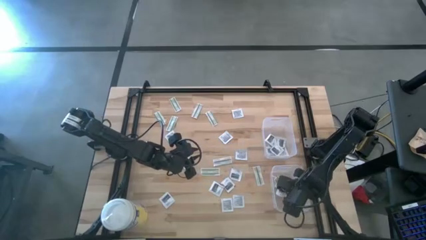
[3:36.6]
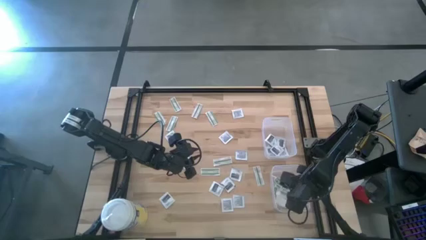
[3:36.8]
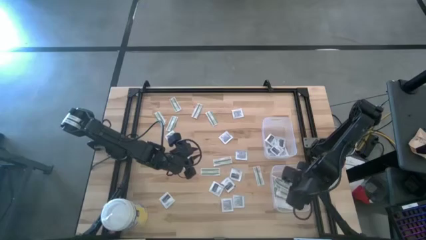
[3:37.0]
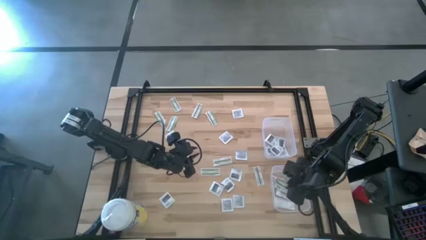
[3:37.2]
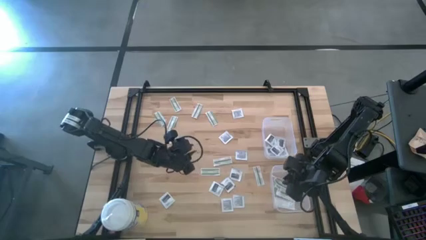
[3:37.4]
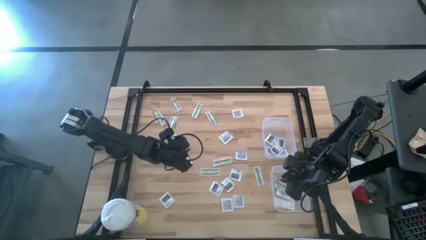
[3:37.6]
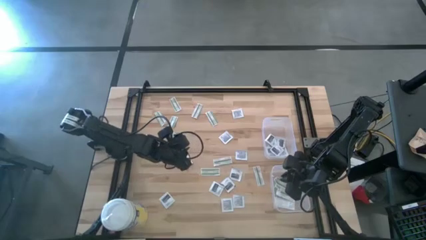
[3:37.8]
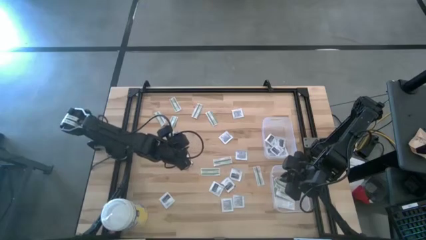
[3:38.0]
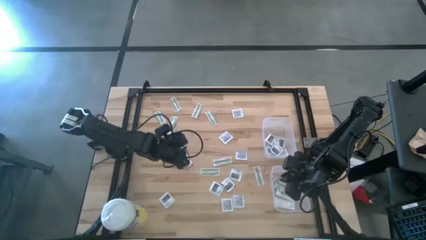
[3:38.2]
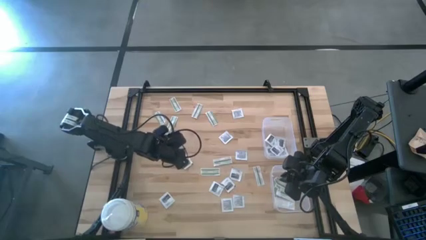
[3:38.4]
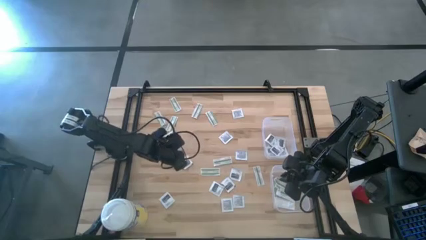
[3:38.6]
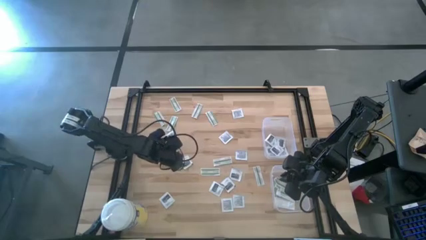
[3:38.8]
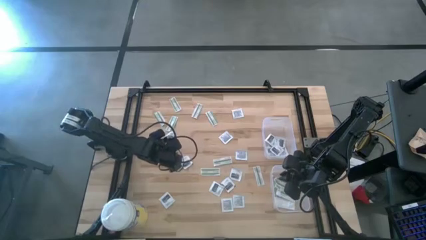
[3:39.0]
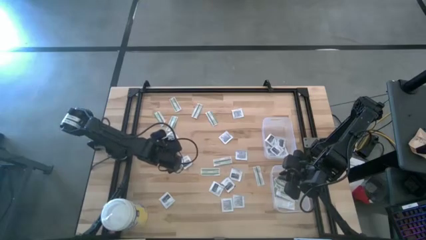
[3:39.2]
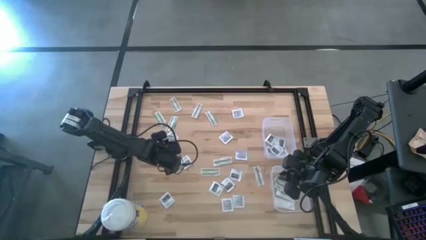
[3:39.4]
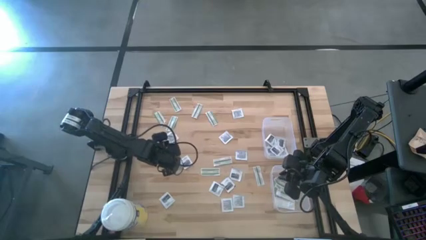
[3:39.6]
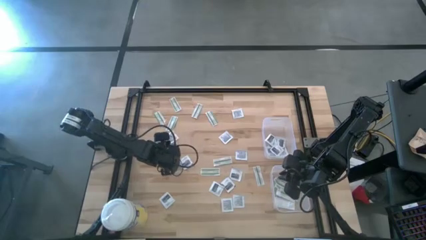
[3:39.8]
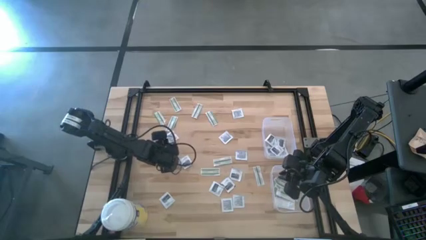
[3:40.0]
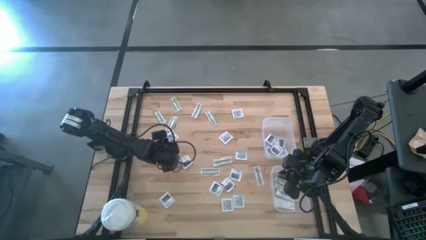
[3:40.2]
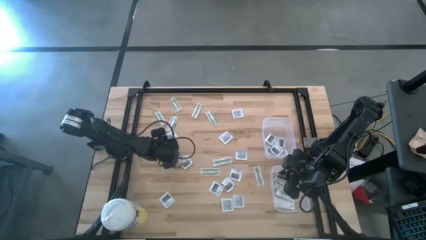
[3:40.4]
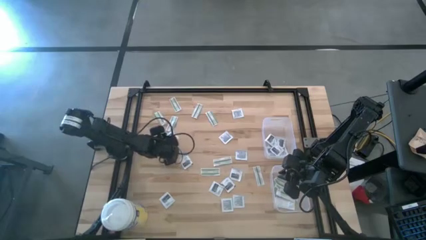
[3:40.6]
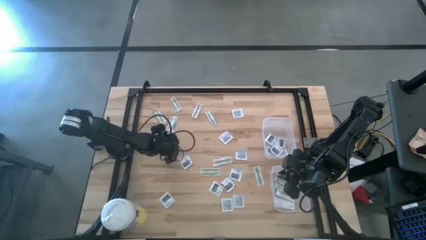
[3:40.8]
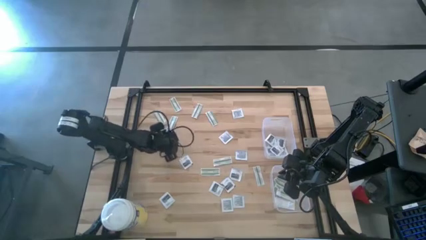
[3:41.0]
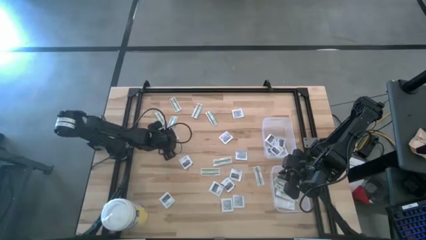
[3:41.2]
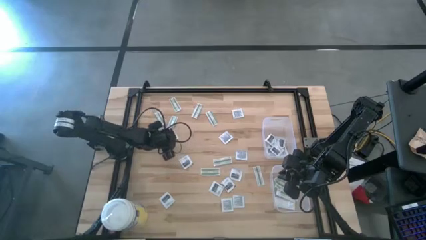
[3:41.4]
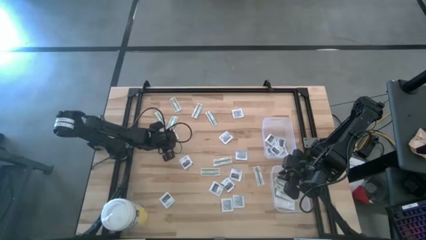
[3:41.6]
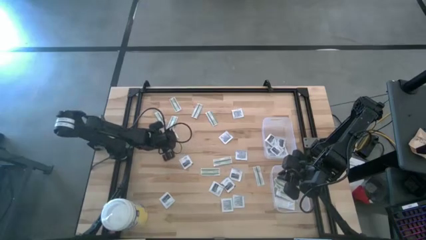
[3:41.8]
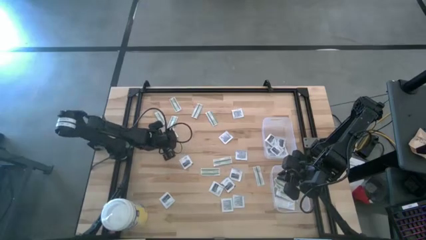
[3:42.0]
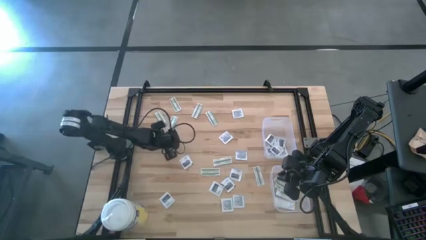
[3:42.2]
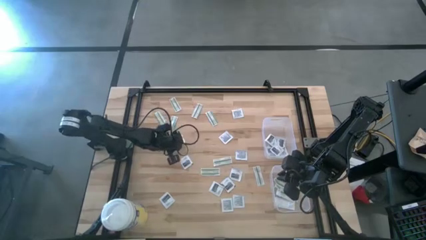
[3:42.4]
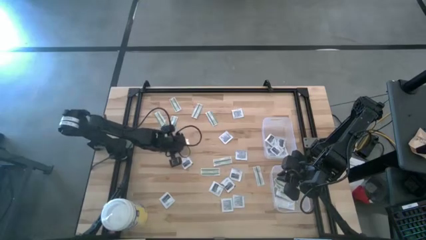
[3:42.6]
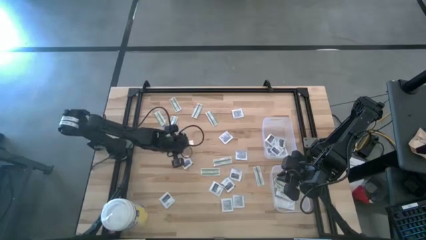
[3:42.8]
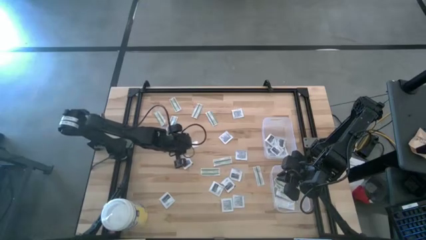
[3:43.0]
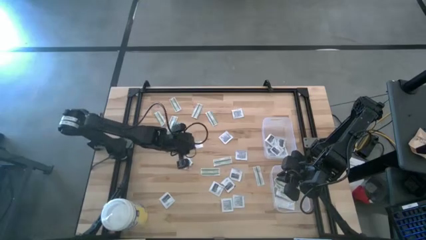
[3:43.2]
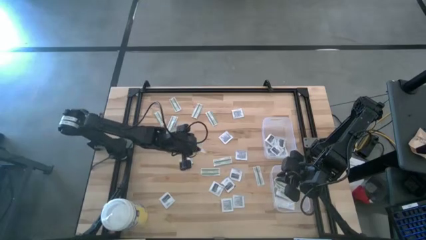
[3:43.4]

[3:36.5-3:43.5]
Task: Pick & Place First Aid Supplies
Put the towelette pack into the top bin

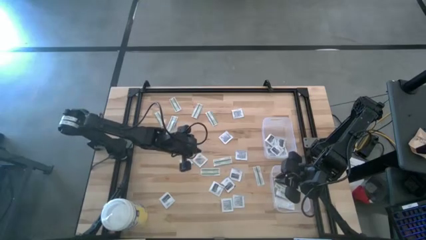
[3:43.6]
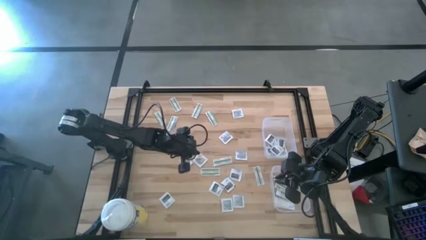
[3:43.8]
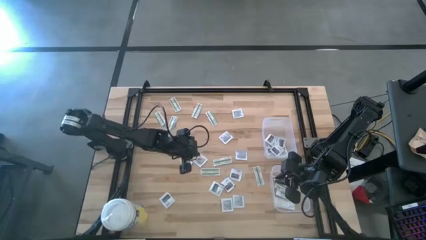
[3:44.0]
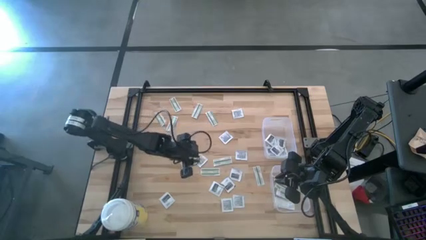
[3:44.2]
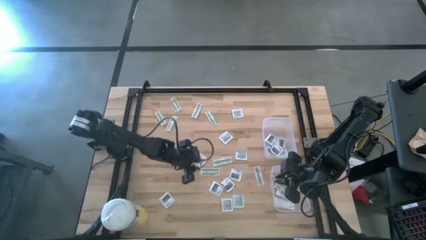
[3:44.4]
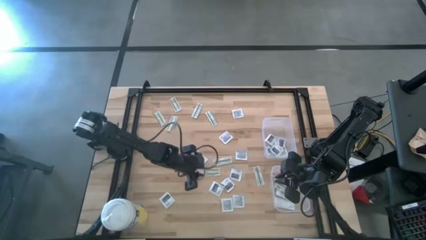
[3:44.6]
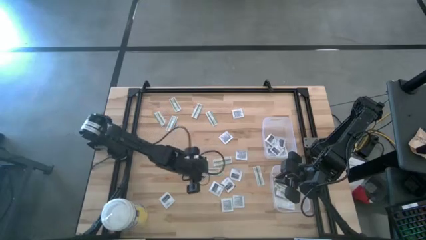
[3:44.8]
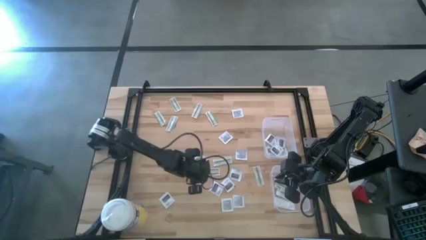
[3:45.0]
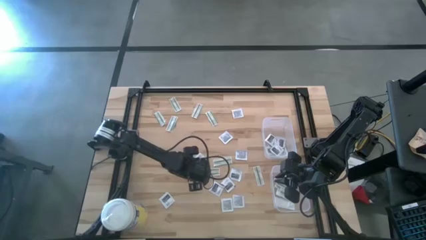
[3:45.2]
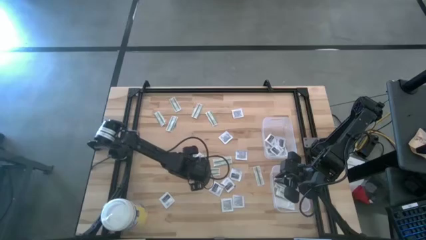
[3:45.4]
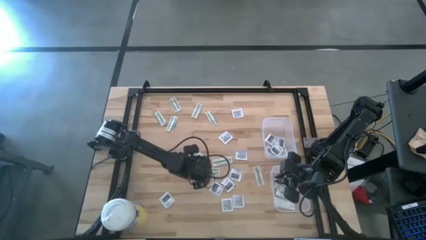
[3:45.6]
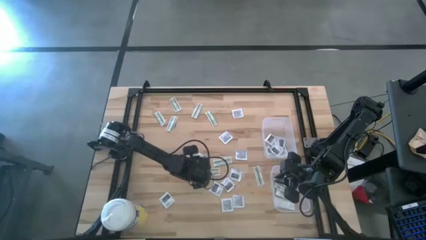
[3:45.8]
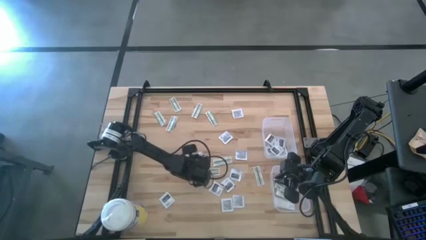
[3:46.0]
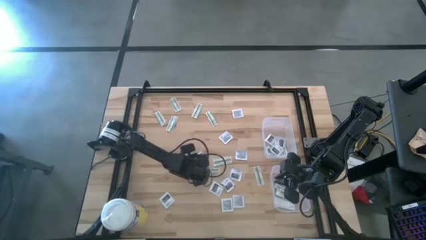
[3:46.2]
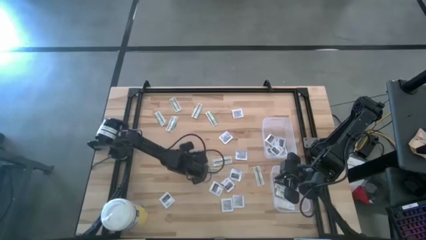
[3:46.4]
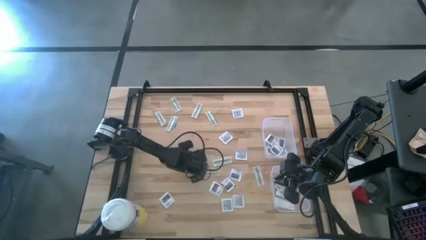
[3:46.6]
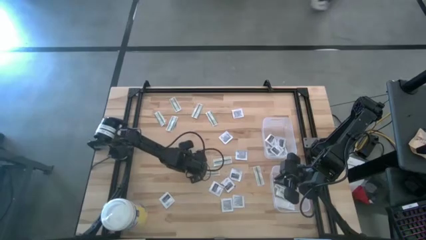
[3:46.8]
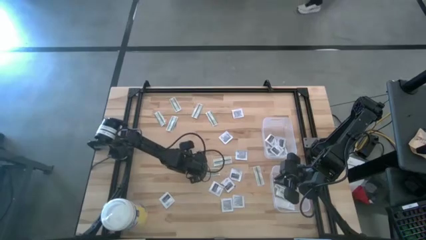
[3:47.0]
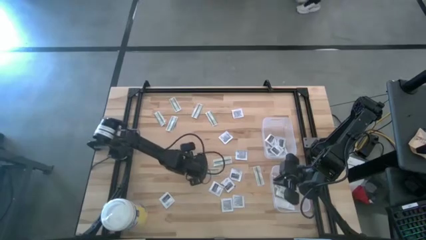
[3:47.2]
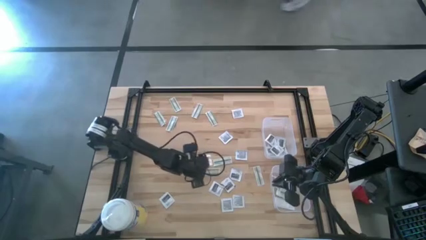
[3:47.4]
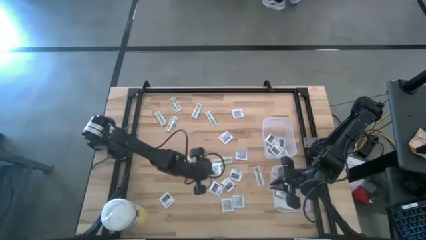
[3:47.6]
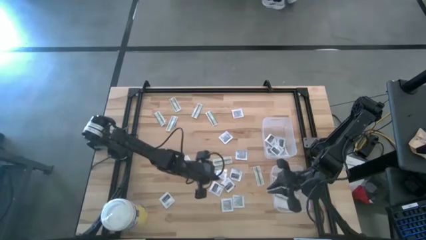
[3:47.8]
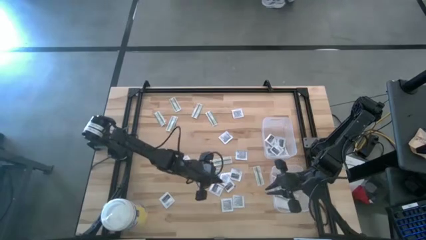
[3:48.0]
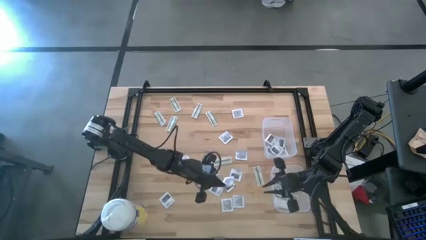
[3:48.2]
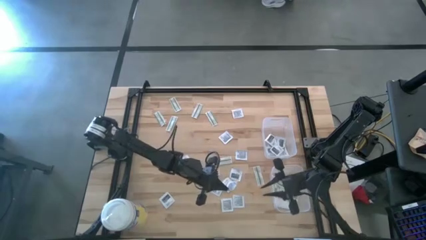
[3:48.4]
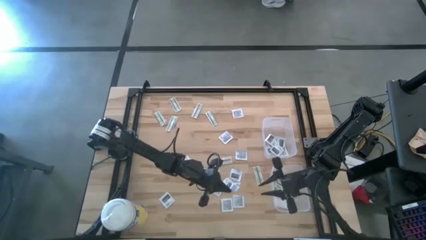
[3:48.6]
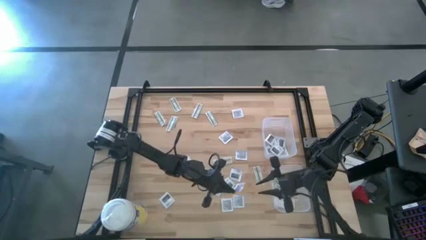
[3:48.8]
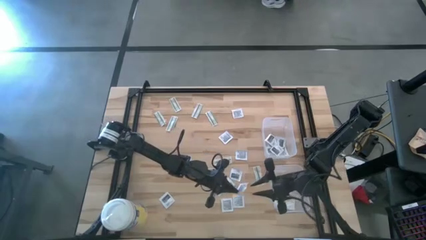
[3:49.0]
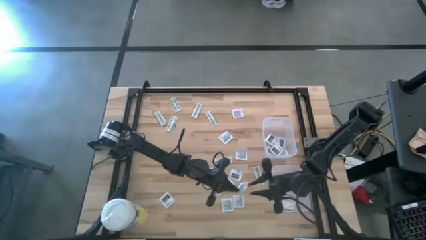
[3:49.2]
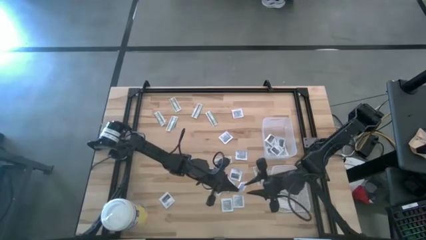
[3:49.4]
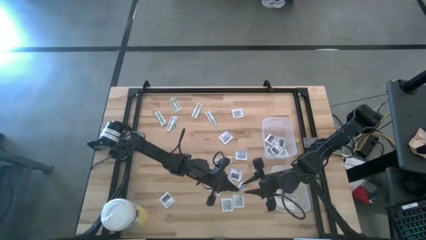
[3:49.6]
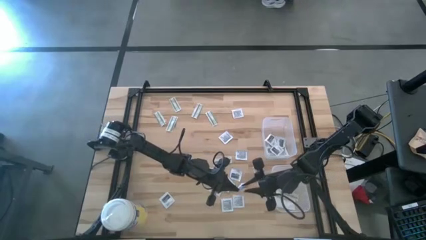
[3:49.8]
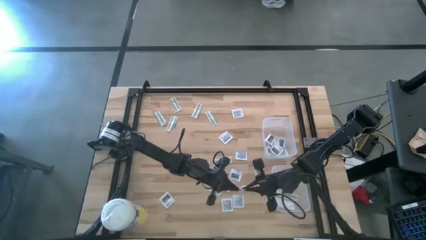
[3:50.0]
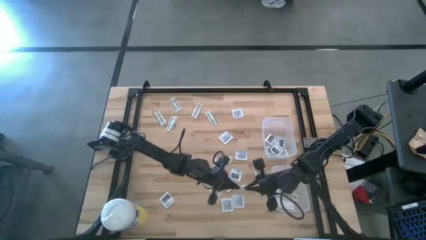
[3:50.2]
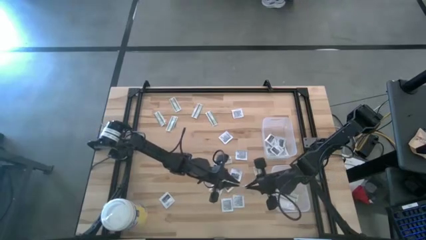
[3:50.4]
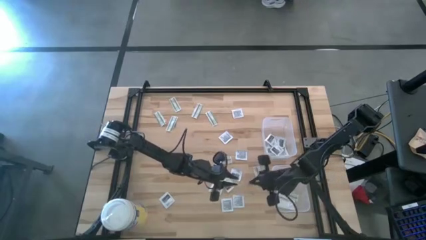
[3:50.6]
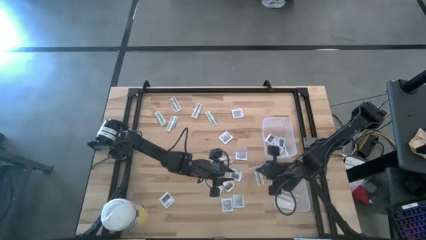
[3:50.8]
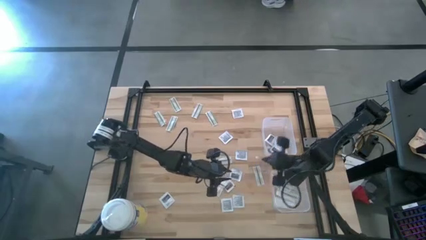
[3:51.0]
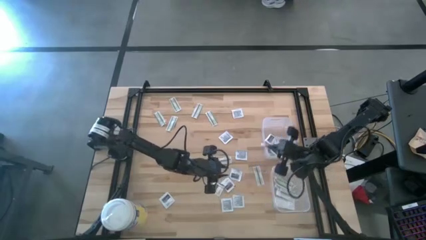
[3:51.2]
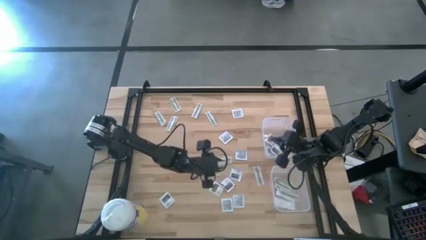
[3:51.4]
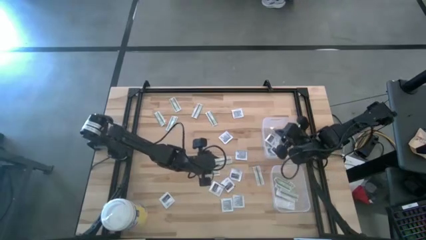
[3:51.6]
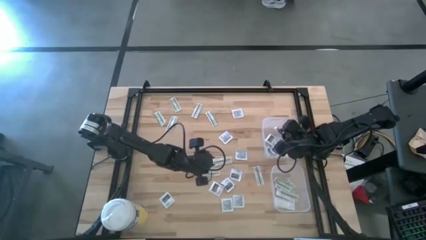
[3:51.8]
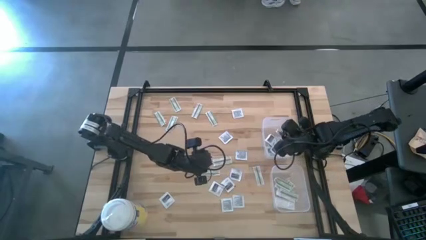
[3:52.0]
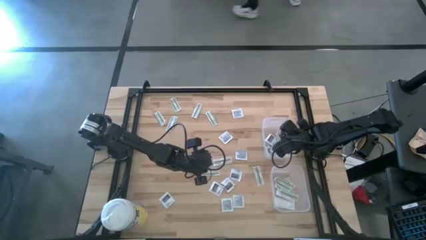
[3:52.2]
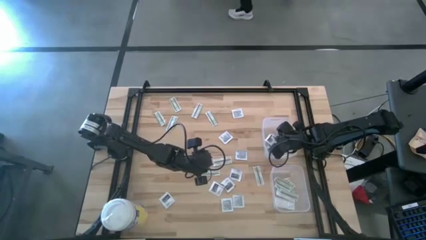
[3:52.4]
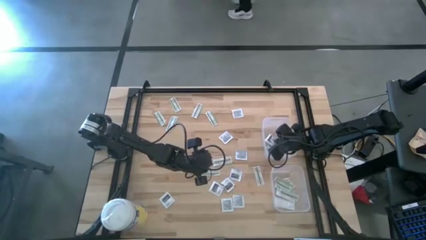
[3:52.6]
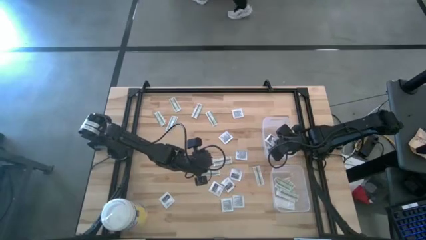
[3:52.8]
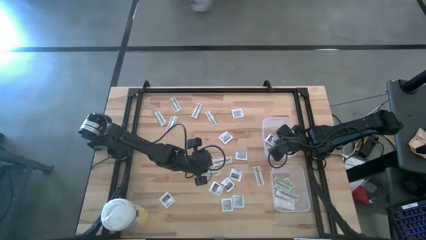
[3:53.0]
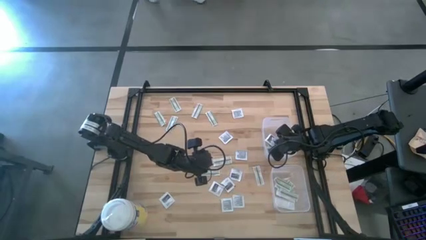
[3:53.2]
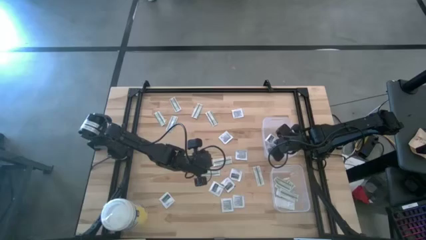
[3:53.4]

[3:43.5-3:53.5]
Put the towelette pack into the top bin
